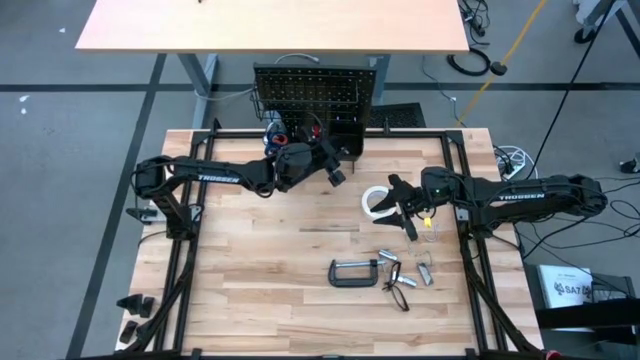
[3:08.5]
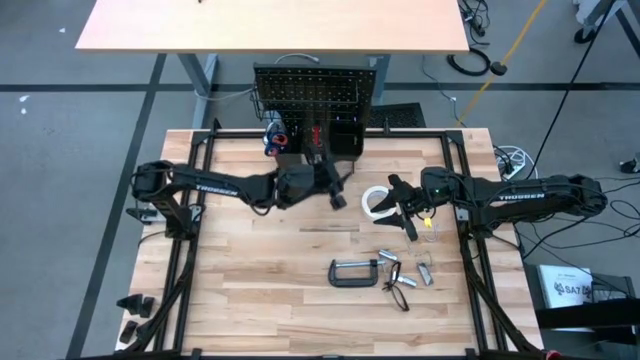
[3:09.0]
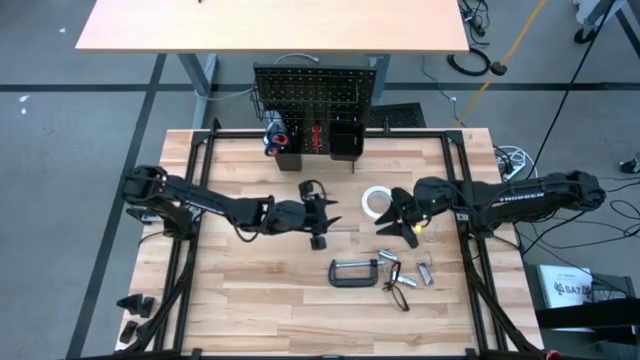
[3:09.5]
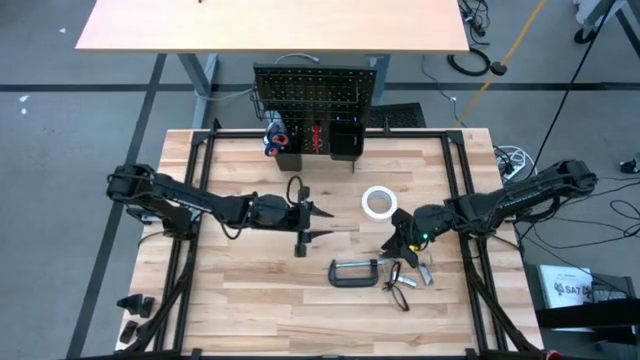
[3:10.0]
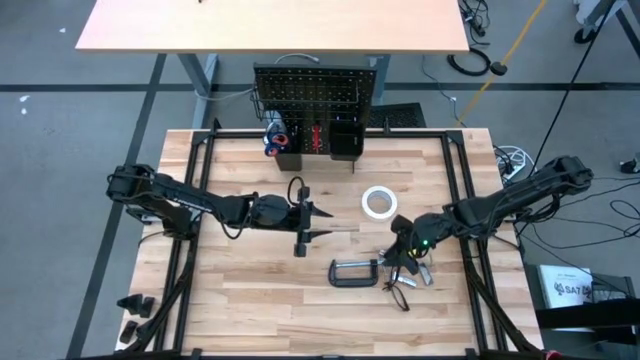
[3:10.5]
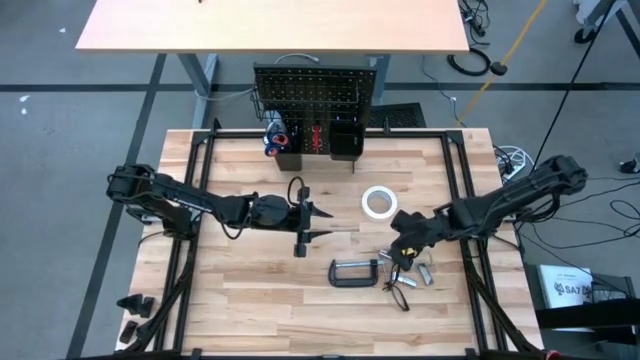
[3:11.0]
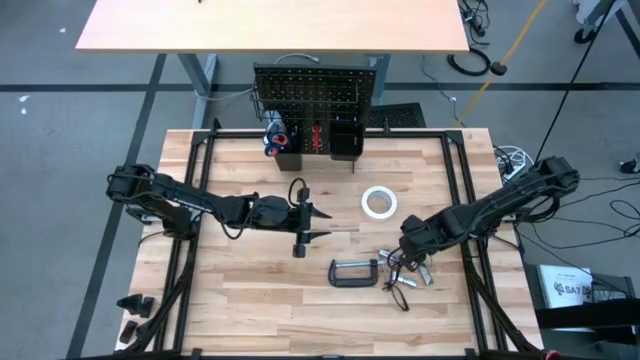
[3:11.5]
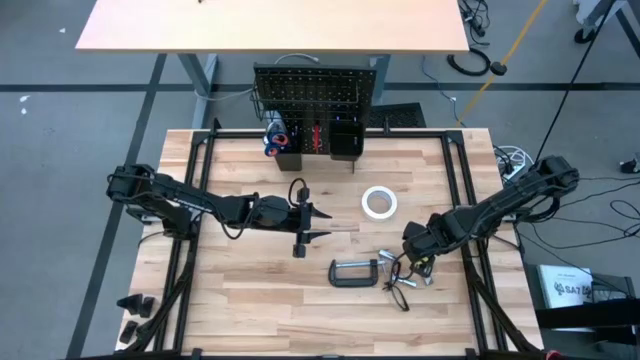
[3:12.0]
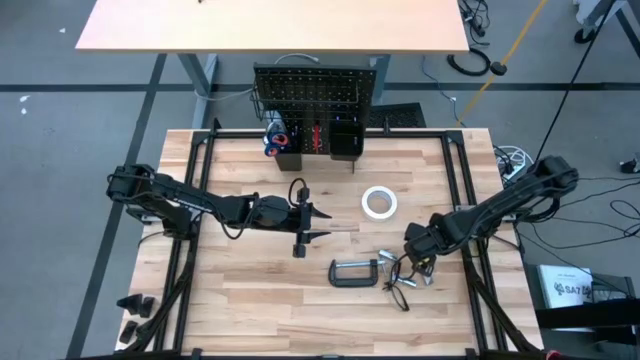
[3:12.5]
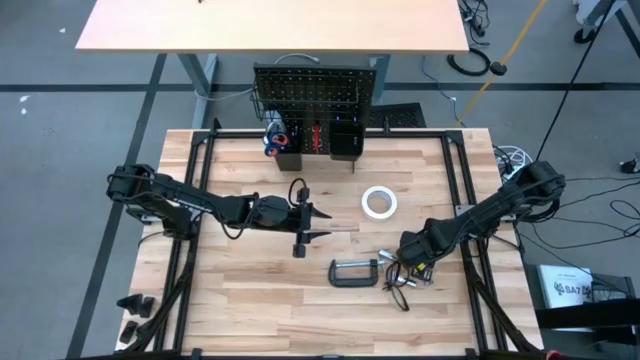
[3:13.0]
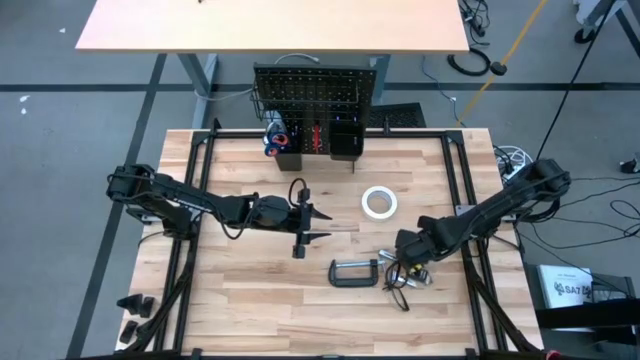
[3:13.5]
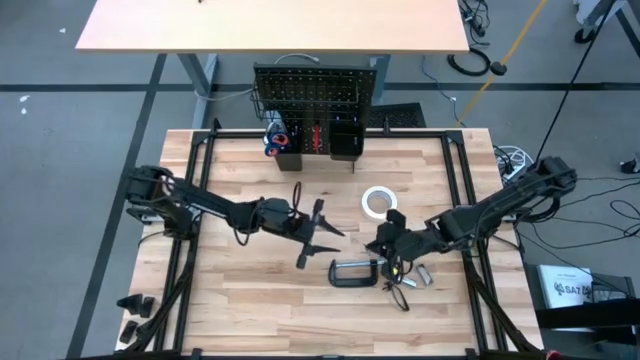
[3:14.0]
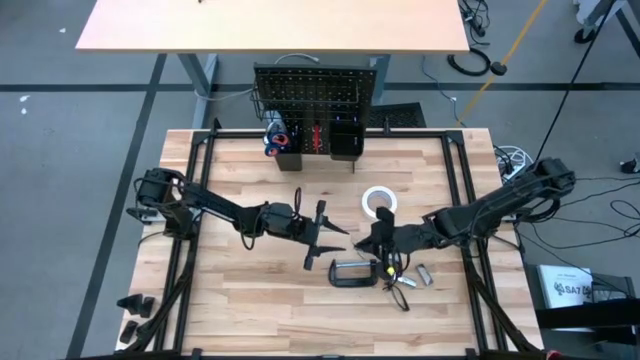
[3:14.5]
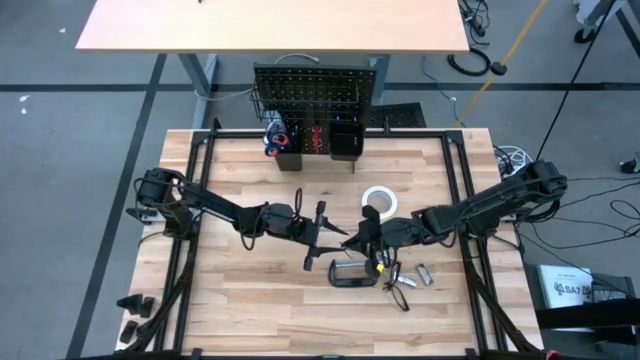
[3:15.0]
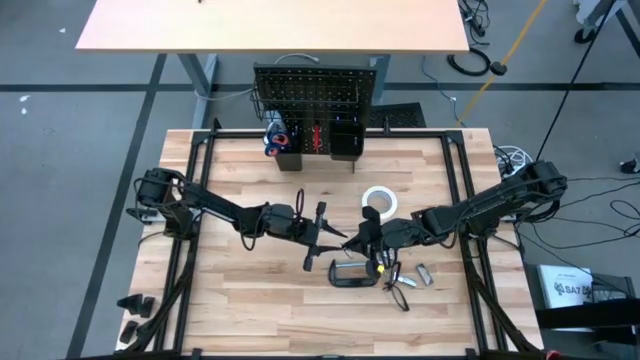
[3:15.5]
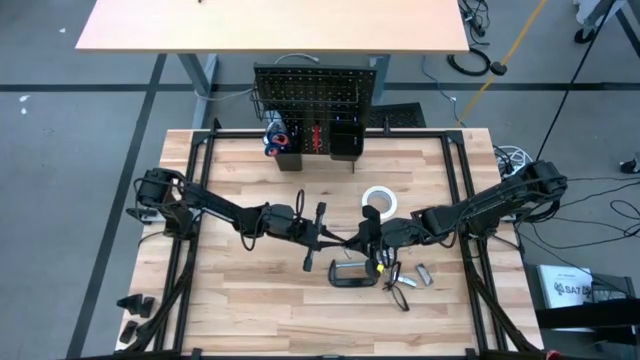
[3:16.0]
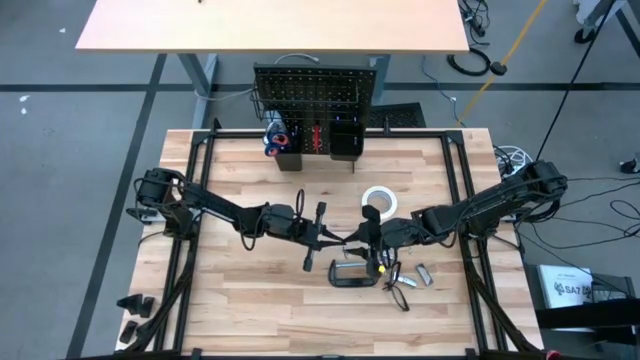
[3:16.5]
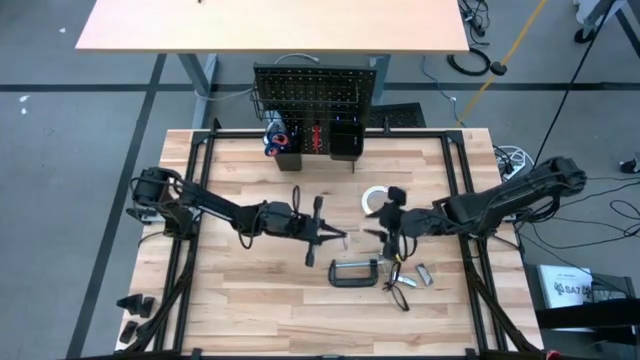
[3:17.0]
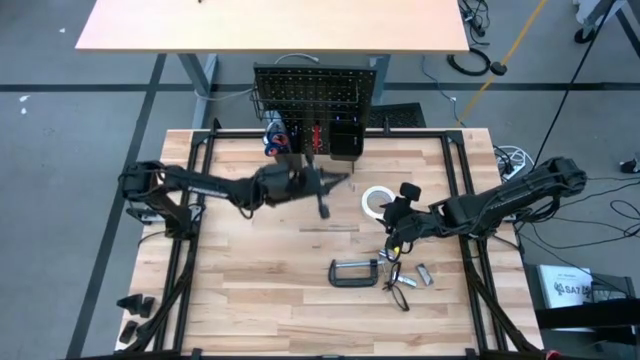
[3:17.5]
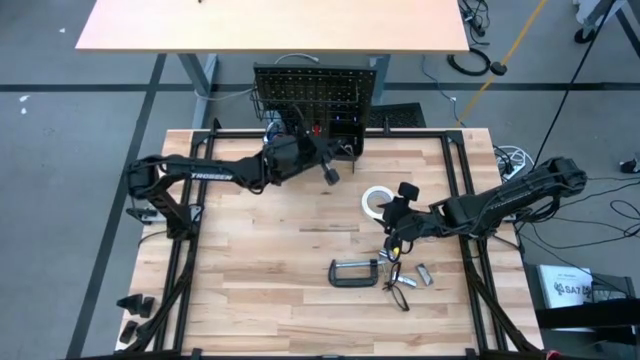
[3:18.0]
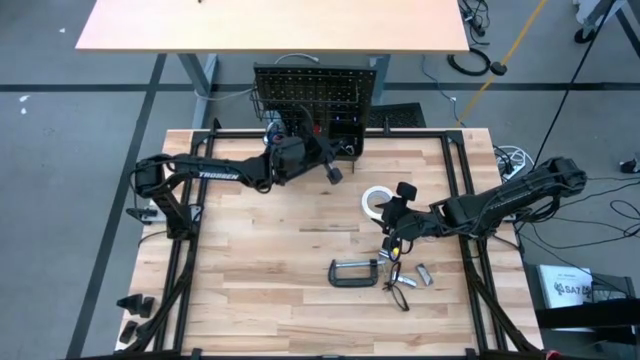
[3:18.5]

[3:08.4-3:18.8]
Task: Hang tools onto peg board
Put the binder clip on the right lower deck of the pegboard

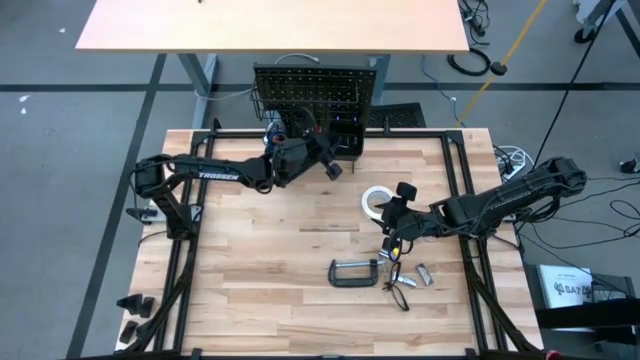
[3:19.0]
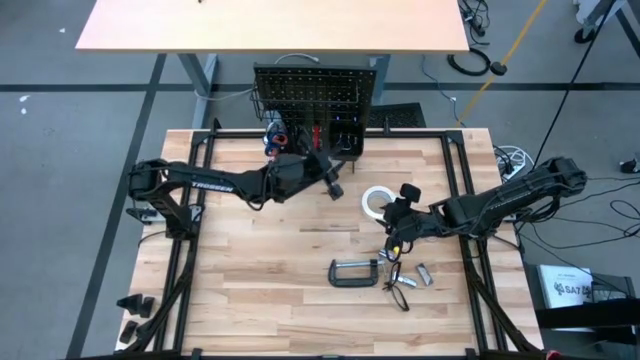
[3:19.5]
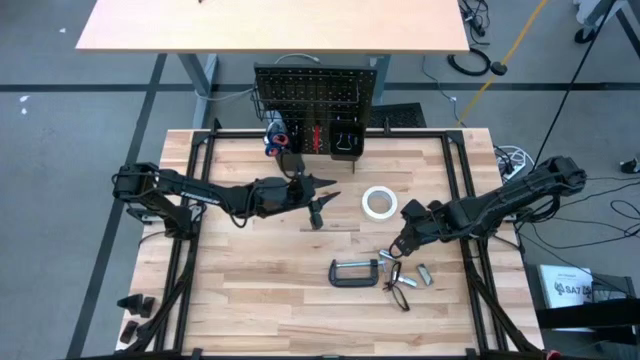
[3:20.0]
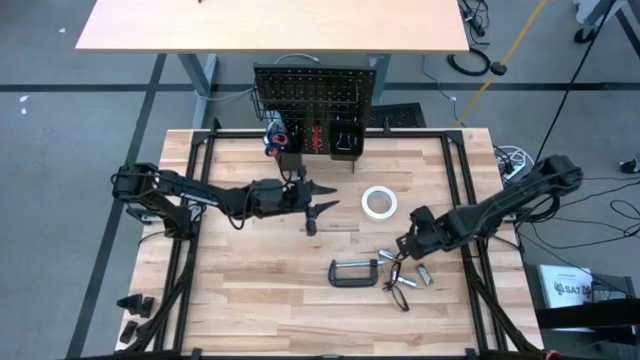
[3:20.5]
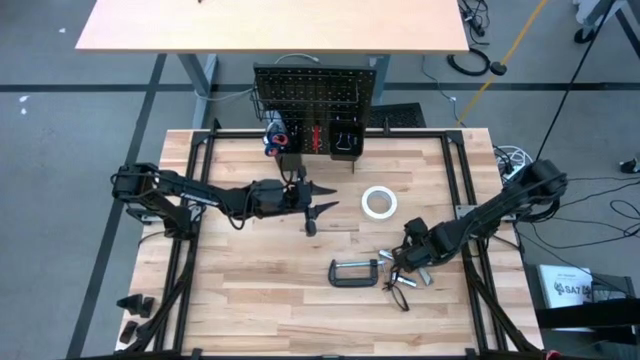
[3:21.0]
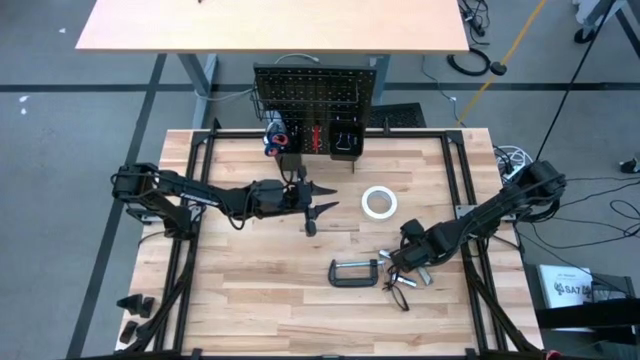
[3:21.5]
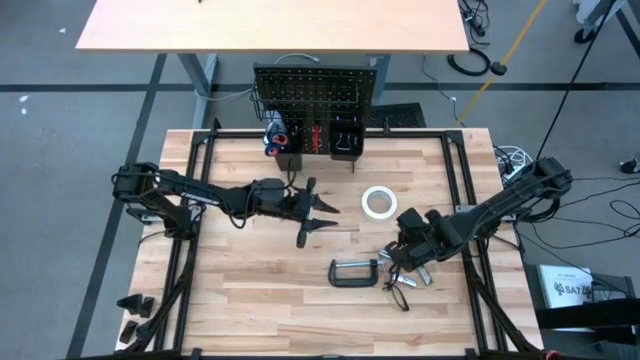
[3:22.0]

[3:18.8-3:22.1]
Put the hanger hook on the right lower deck of the pegboard

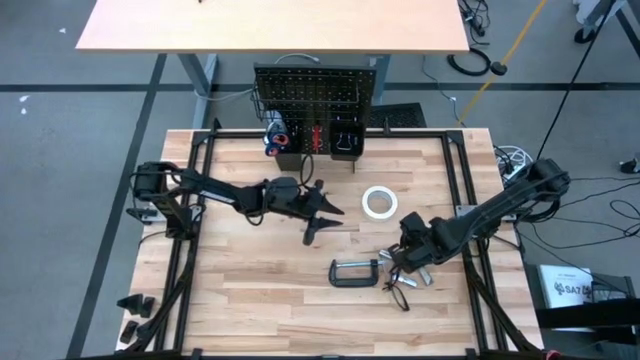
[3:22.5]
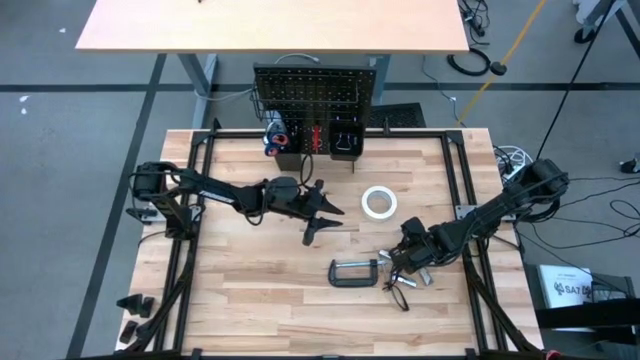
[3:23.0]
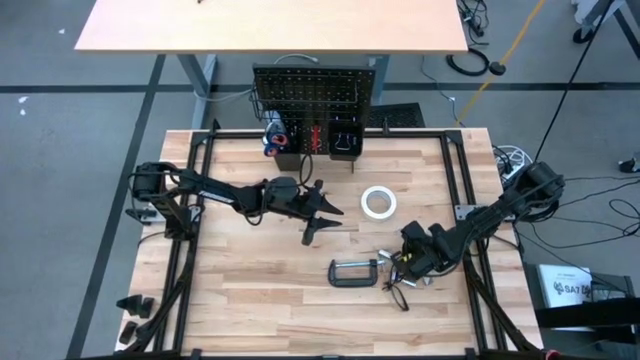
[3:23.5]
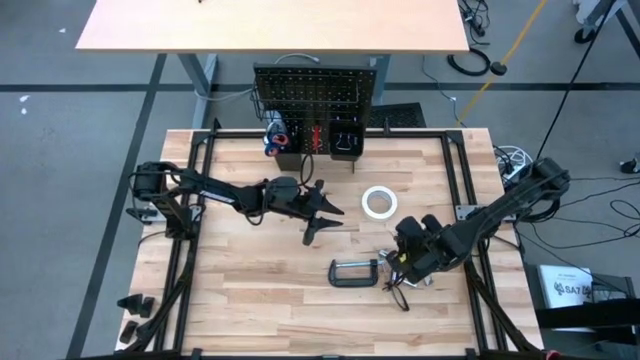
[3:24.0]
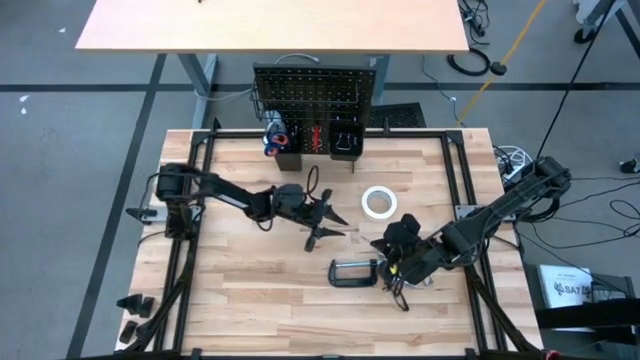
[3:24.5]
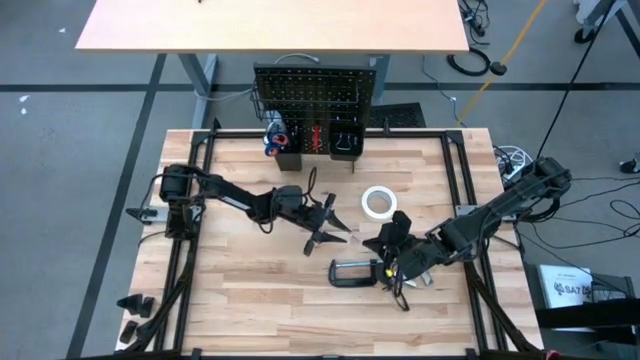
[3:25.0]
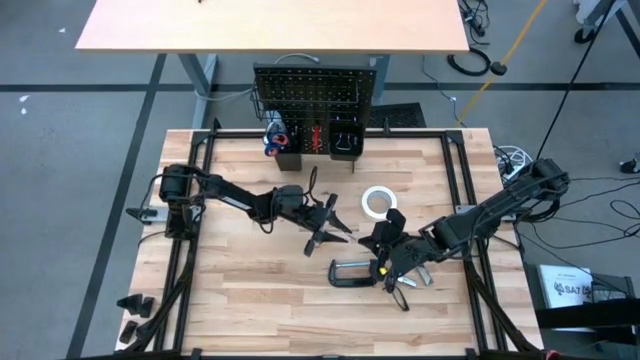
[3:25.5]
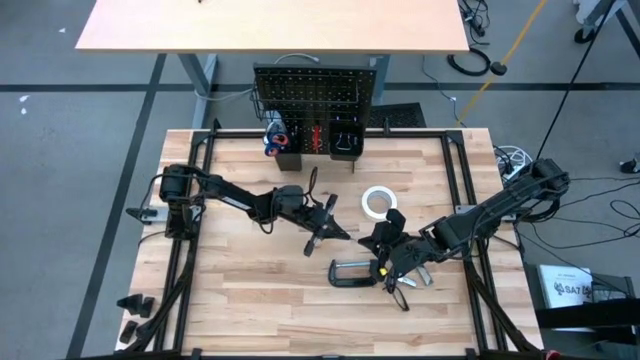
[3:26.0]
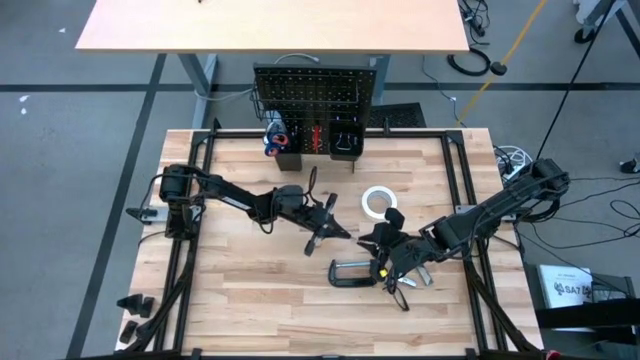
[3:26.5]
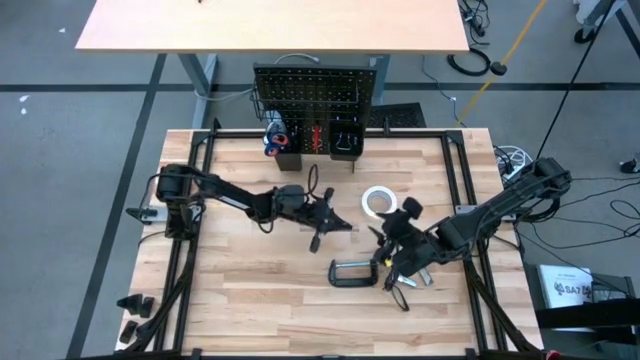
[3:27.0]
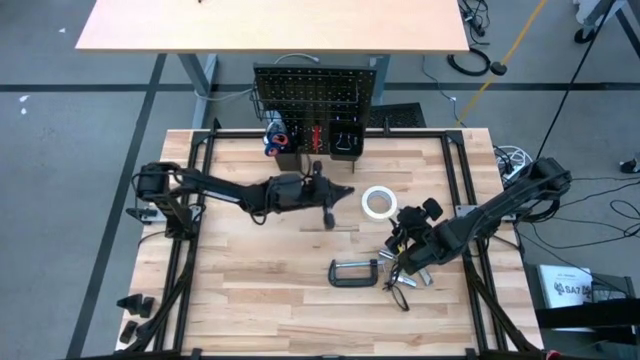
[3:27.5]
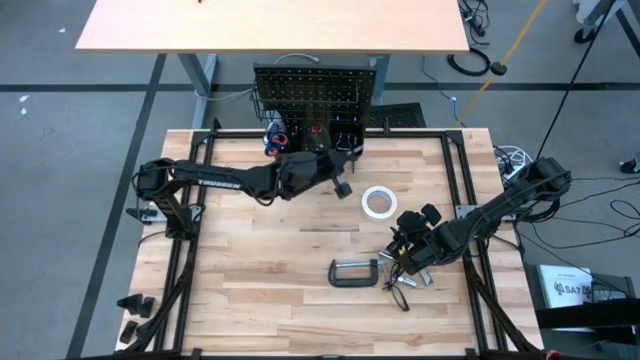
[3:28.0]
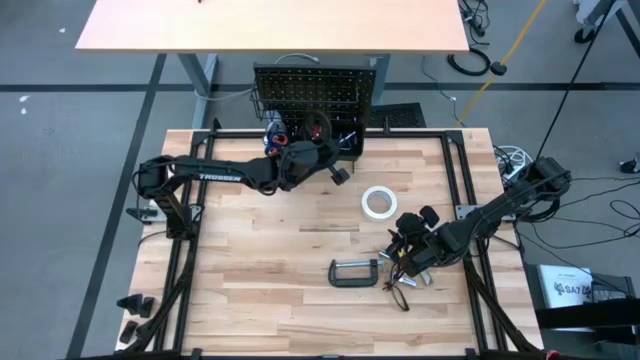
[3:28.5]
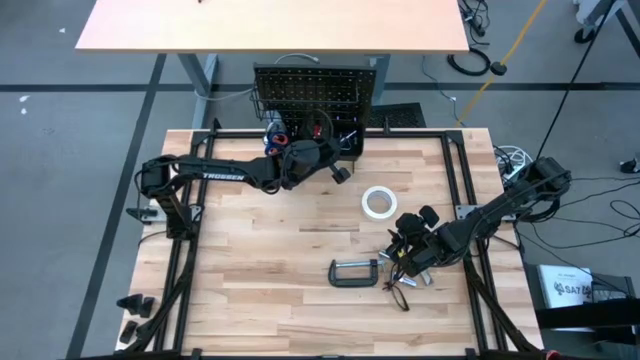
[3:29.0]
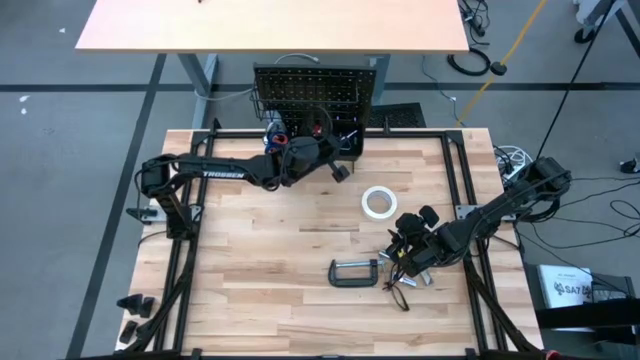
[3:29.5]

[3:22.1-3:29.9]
Put the hanger hook on the right lower deck of the pegboard
